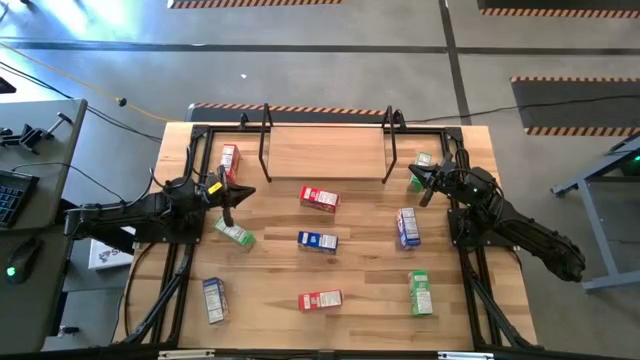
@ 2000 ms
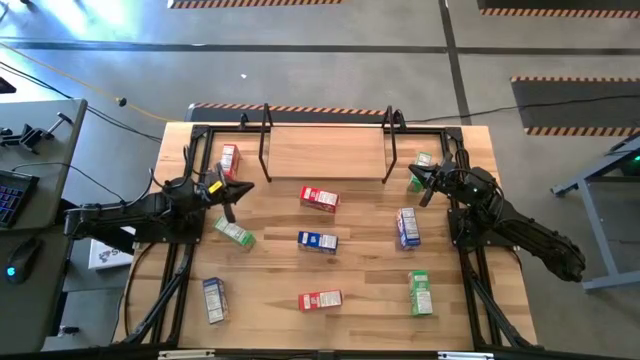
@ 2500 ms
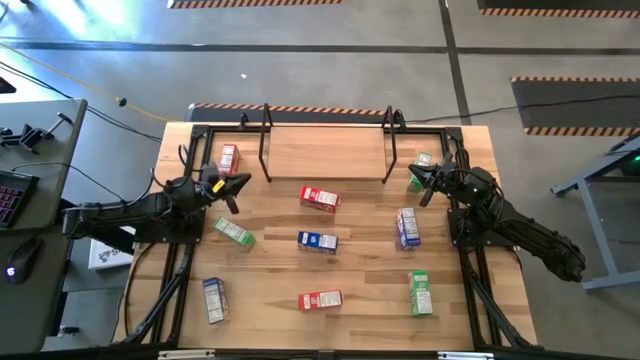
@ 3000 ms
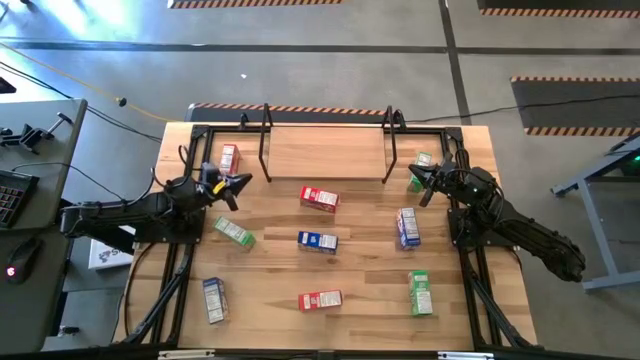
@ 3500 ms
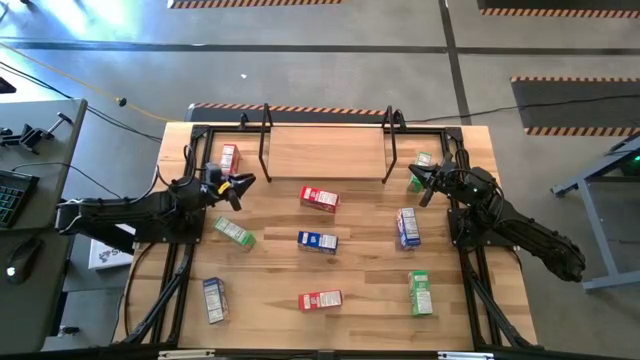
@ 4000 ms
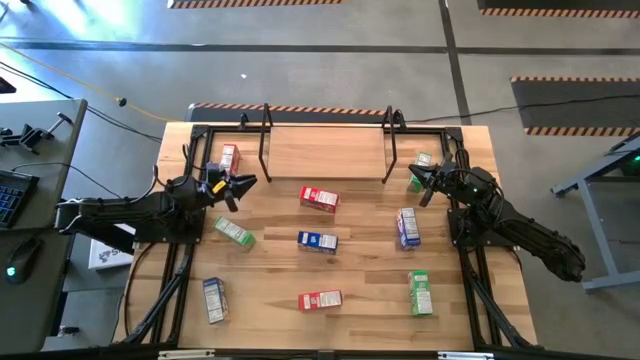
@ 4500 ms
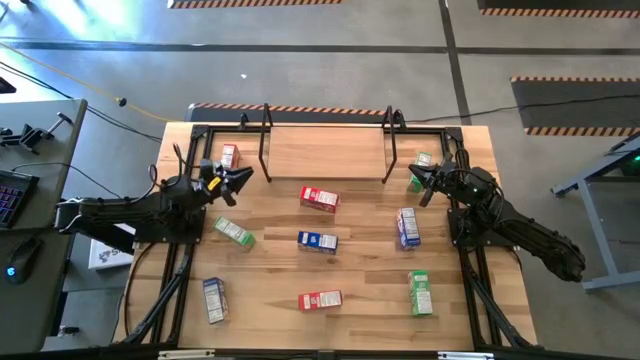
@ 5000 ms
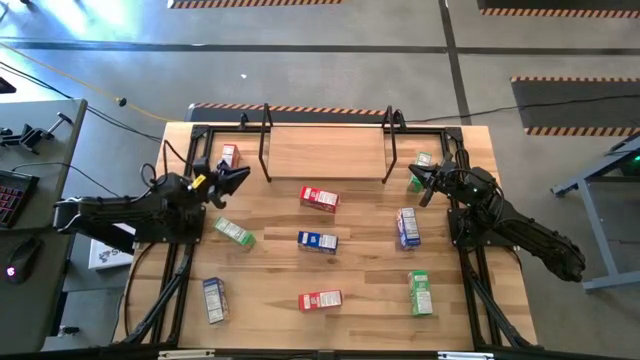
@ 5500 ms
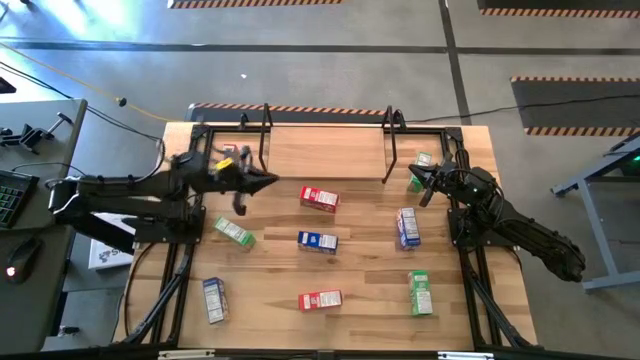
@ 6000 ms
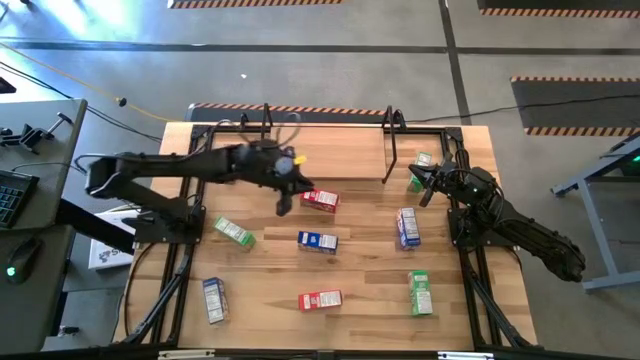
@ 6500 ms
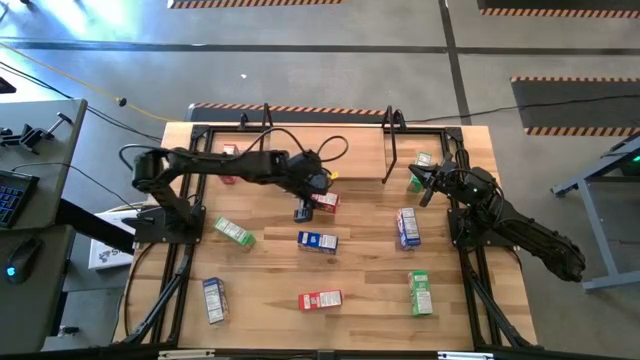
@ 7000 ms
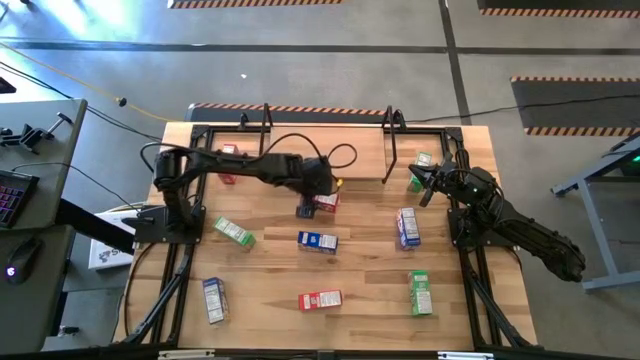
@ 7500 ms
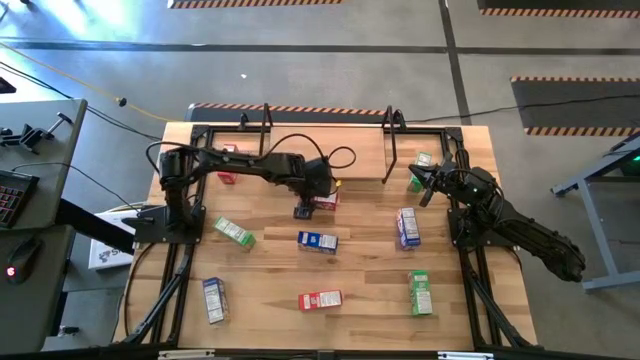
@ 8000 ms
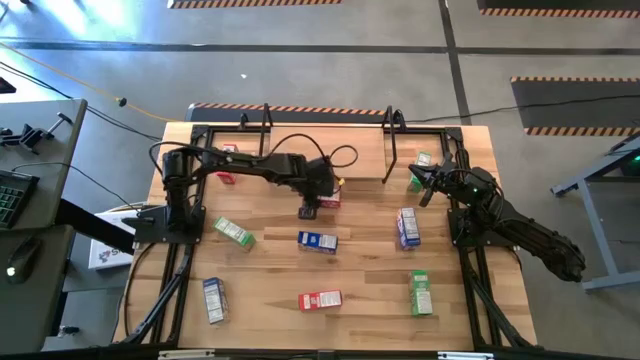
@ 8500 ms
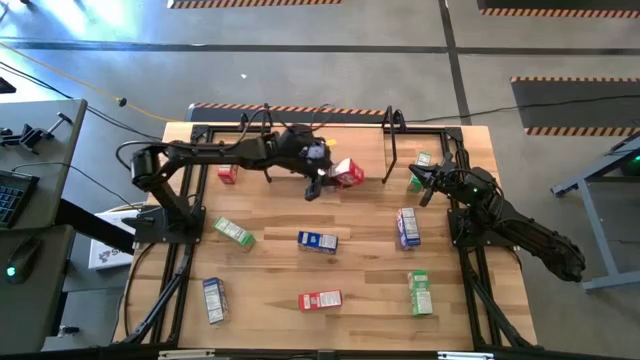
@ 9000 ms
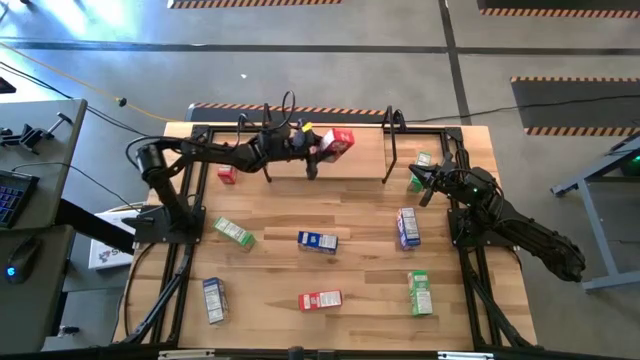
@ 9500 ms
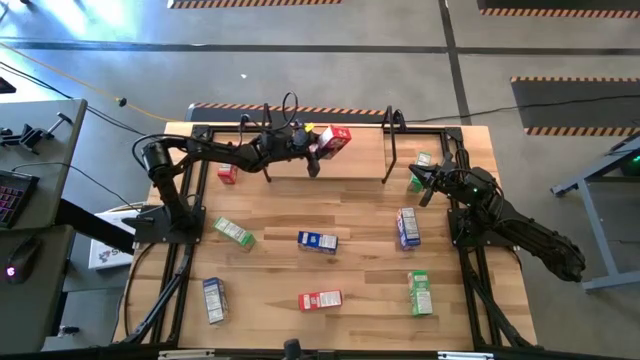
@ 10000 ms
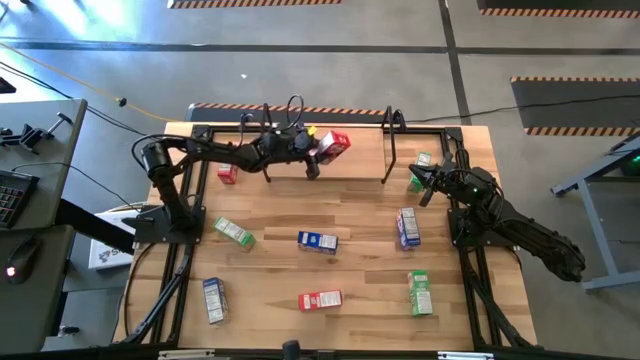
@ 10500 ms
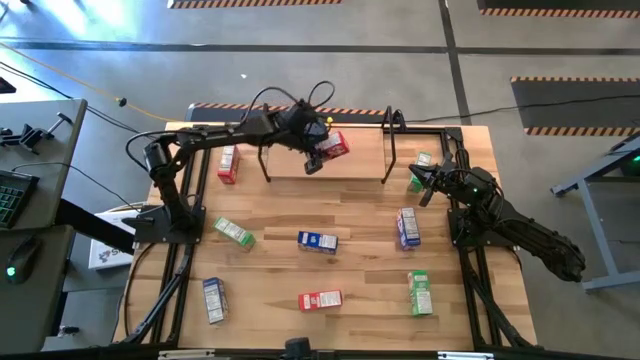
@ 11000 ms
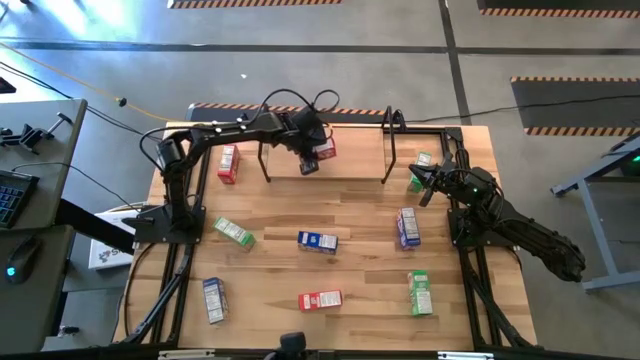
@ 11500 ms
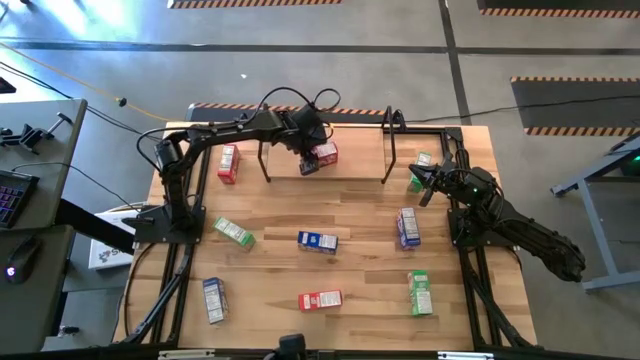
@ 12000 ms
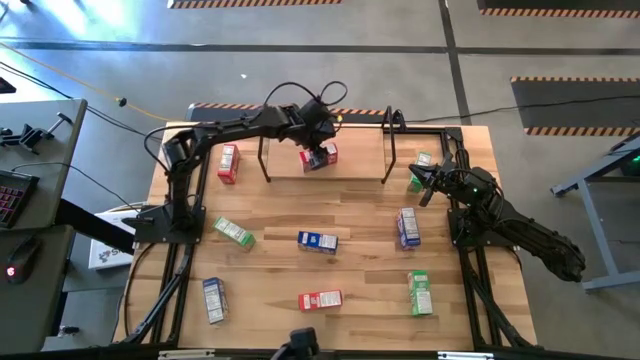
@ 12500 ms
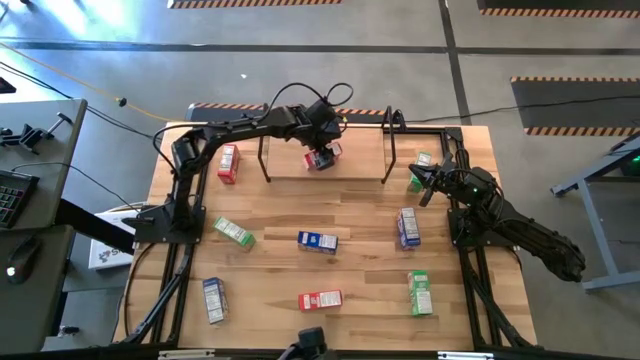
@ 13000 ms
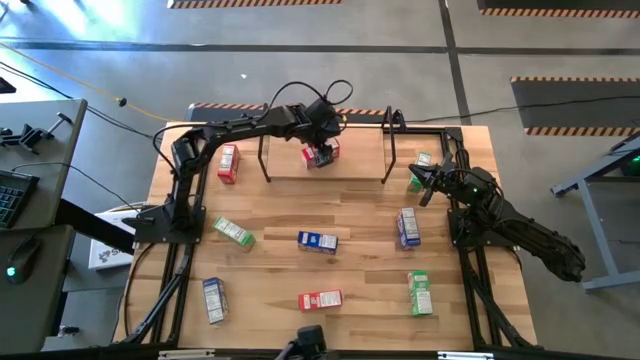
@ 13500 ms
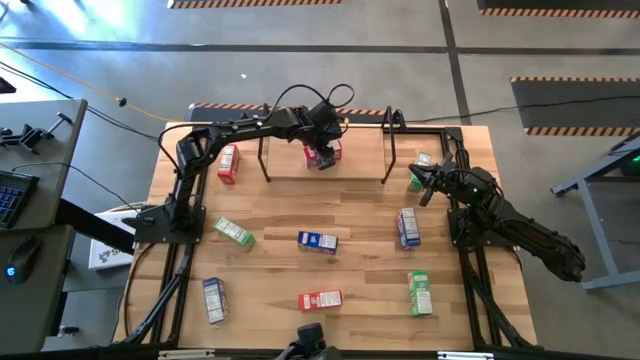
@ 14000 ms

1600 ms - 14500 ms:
Task: Stack cereal on shelf
Put the middle red cereal box on the shelf

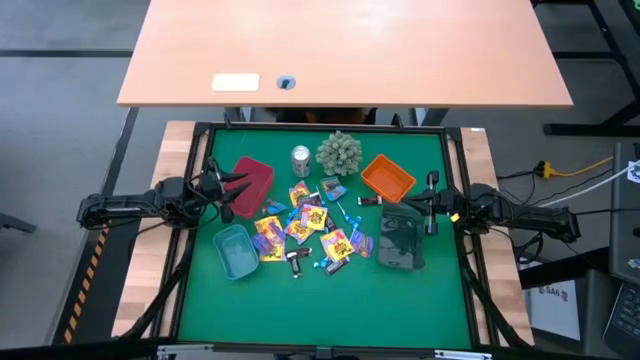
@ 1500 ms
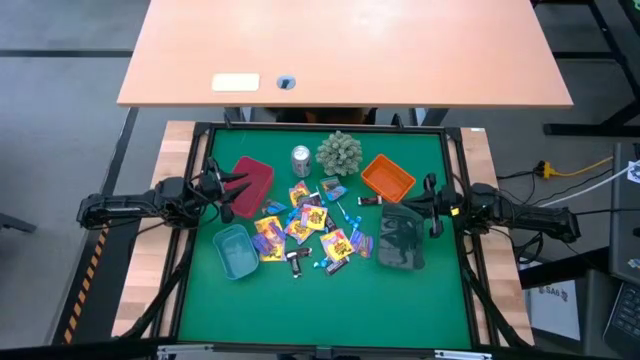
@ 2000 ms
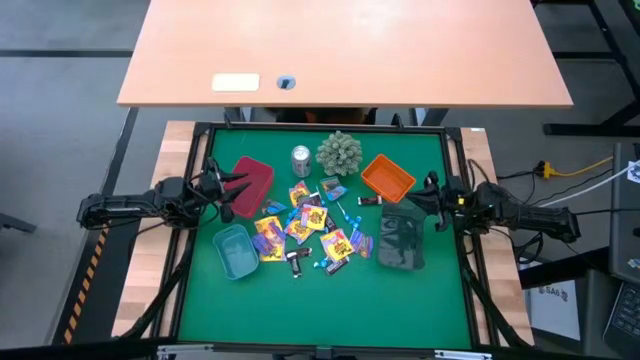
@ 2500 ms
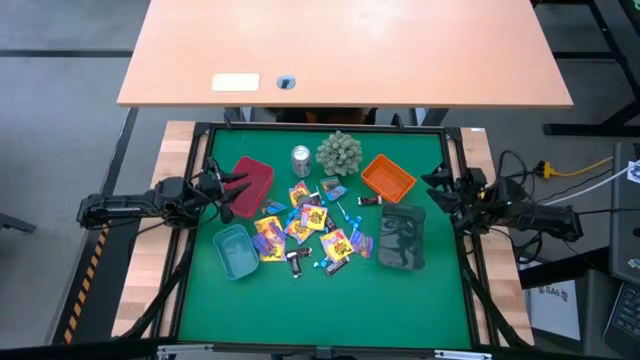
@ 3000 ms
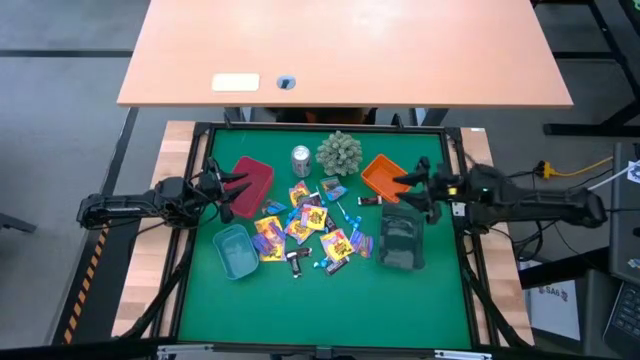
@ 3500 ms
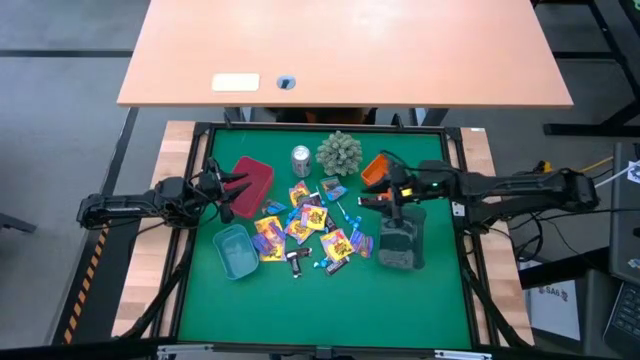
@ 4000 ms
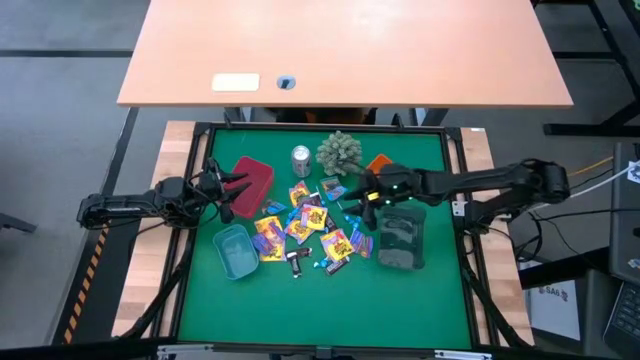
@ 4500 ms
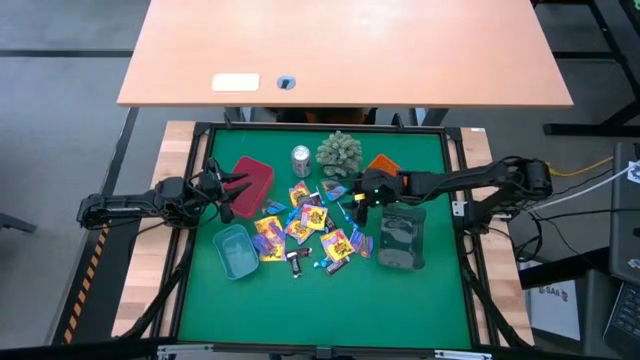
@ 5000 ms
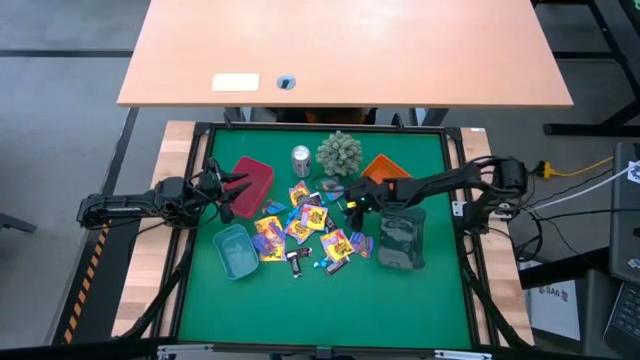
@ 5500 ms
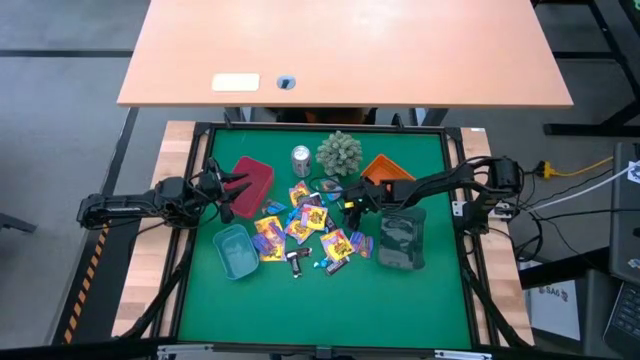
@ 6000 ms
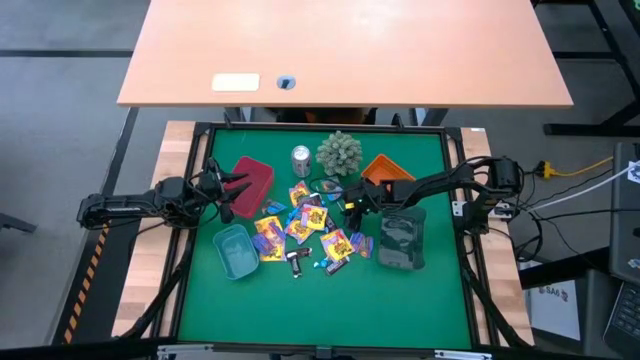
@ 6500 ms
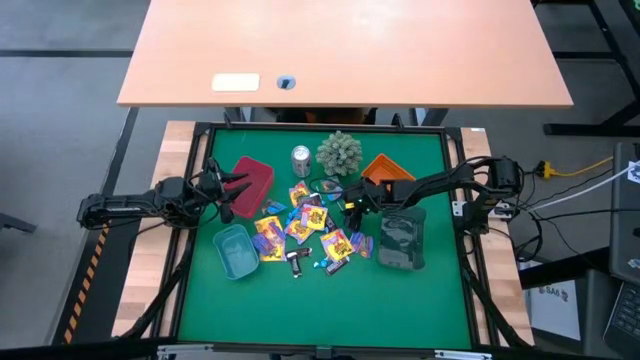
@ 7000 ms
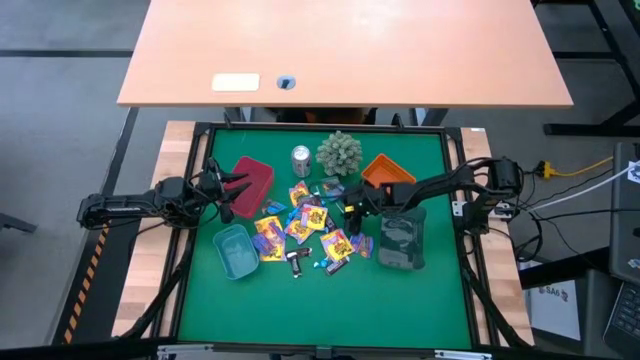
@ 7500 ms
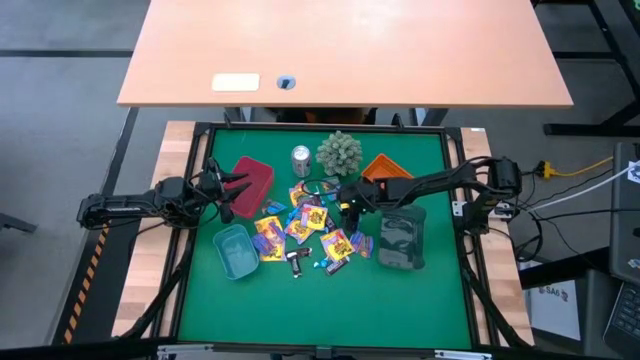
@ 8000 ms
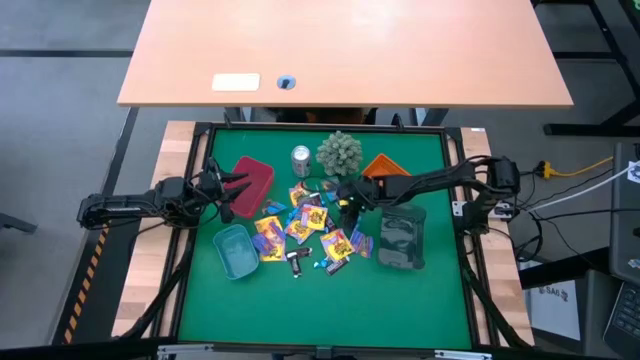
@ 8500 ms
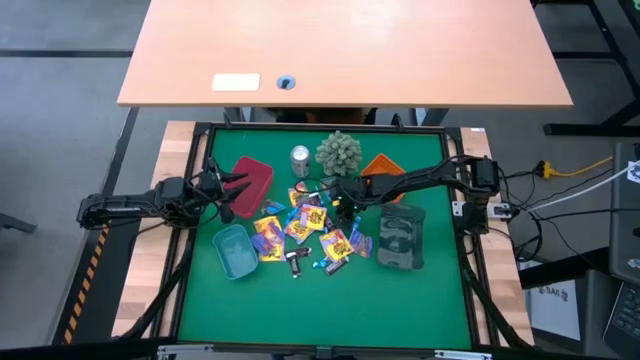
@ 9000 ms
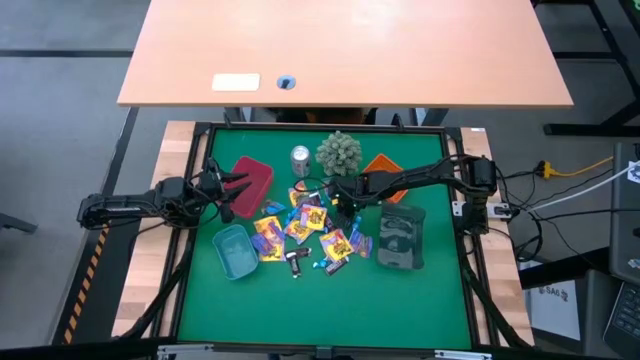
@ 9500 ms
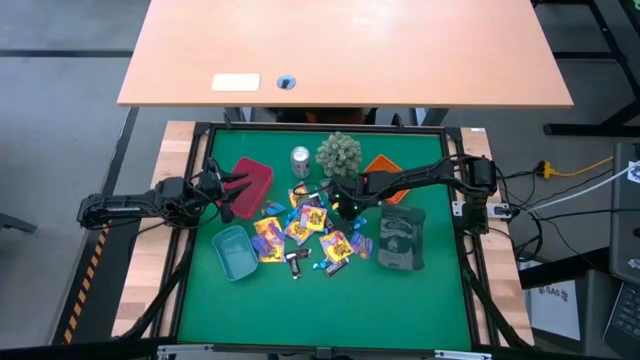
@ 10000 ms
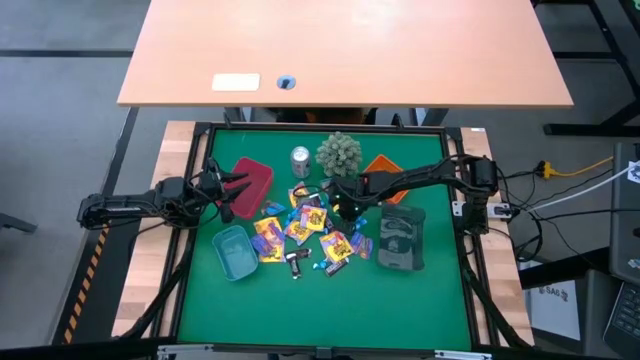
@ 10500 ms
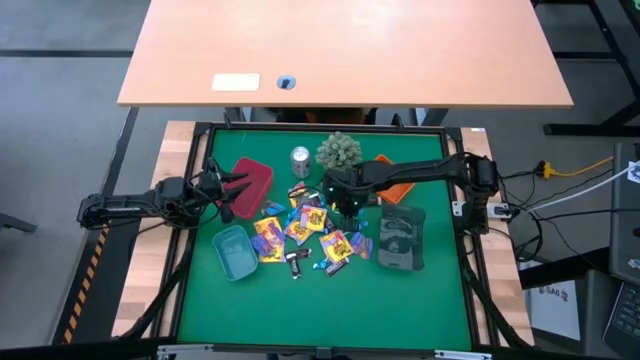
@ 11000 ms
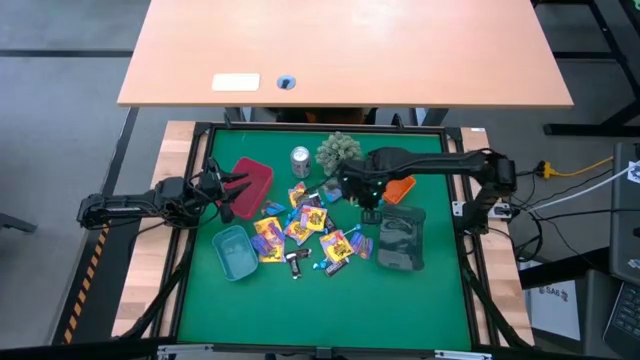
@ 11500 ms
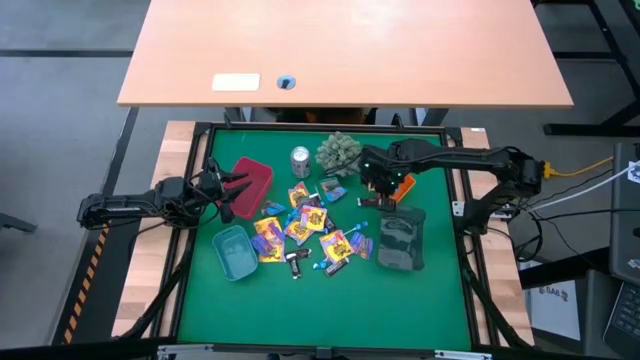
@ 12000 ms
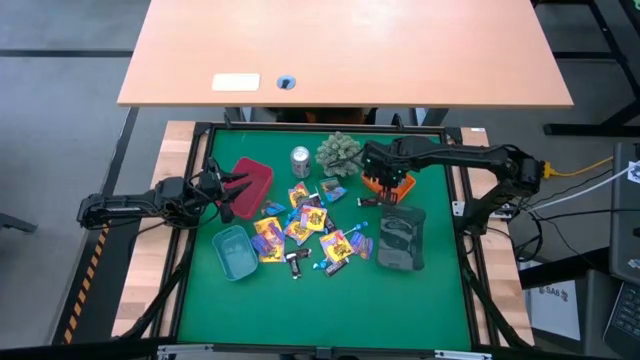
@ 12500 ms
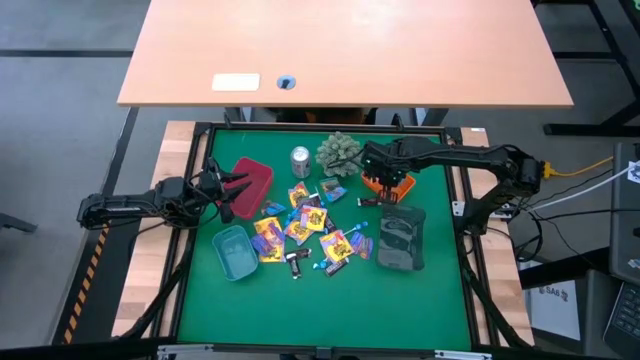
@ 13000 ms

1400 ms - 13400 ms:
Task: Sort candy
Put the blue candy into the orange bin
